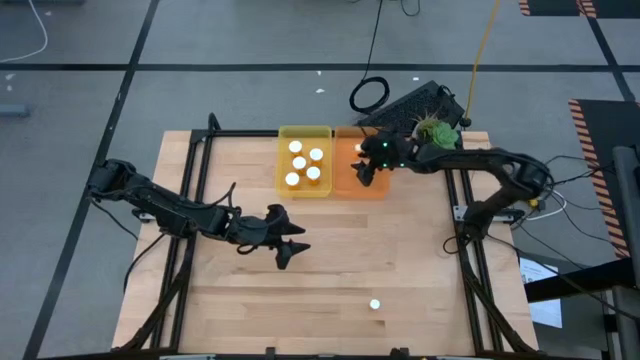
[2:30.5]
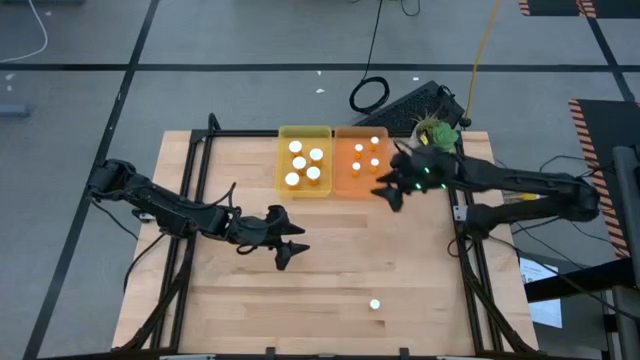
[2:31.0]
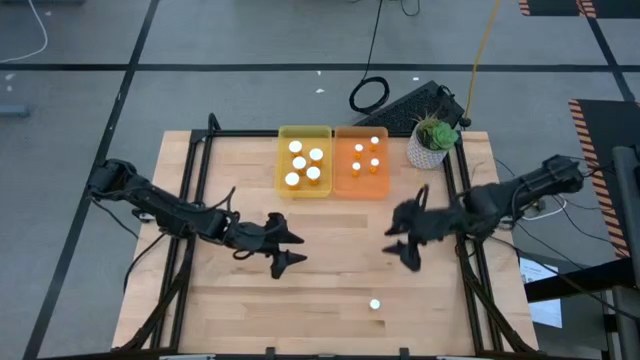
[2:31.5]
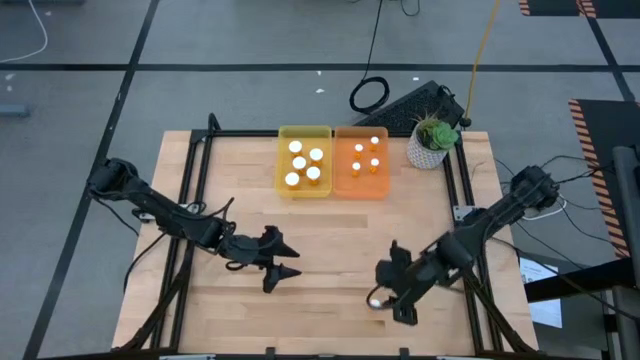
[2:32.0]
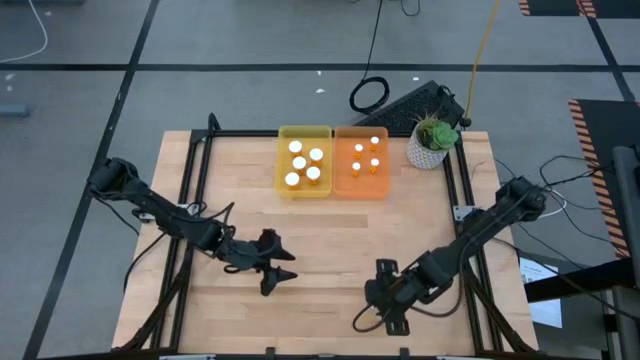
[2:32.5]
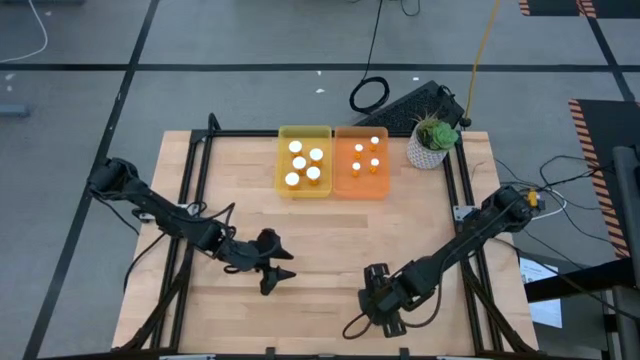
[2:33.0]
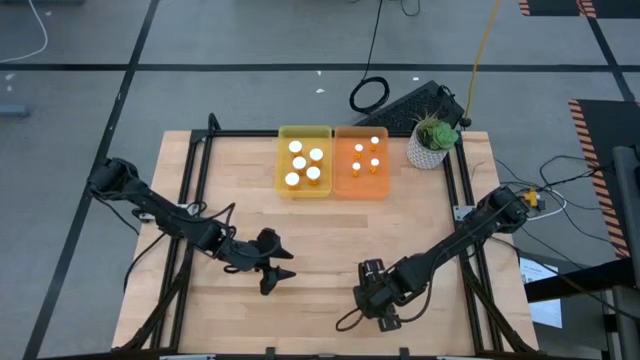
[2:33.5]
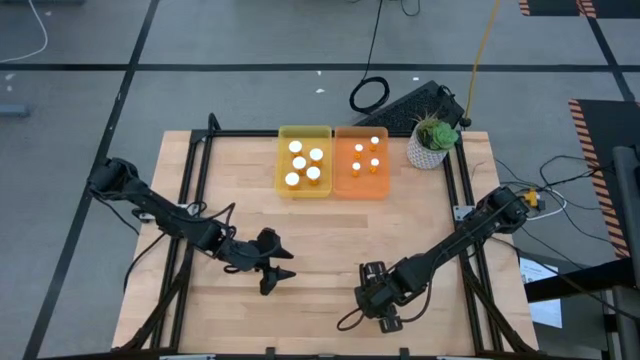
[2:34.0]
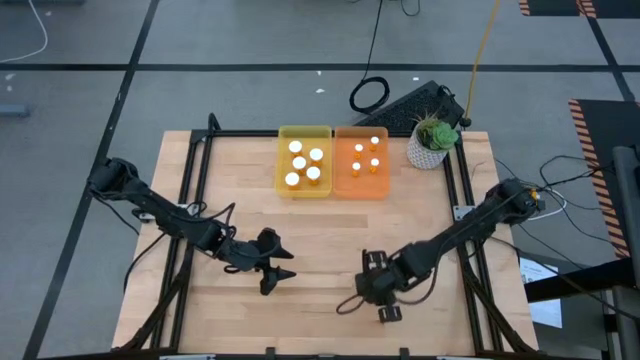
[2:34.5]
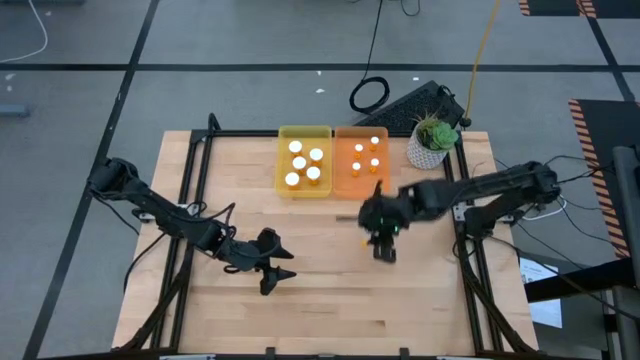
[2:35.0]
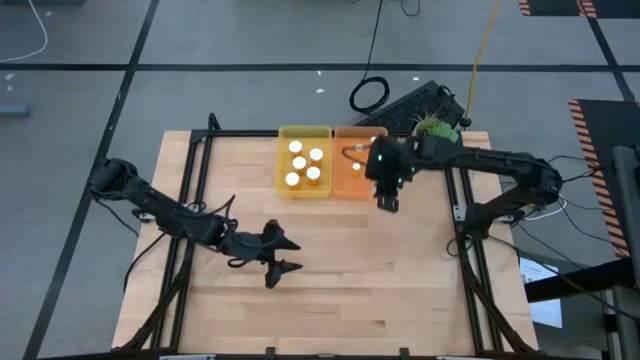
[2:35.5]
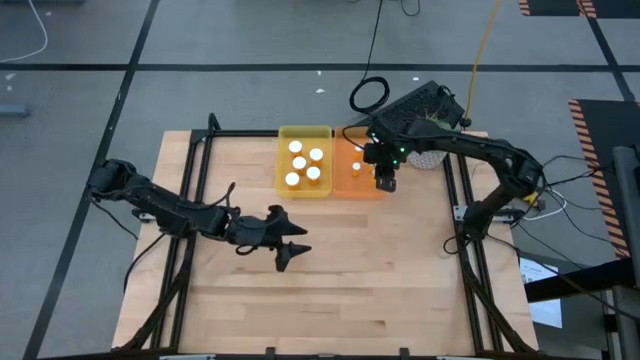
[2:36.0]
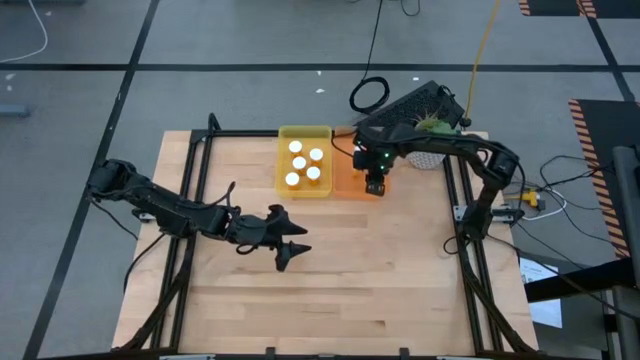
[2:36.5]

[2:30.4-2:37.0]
Task: Pick and place medicine bottles into bin by pill shape (circle, oval)
Put the small orange tablet bottle into the orange bin

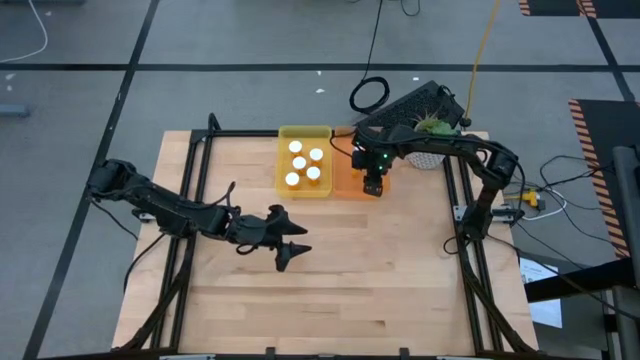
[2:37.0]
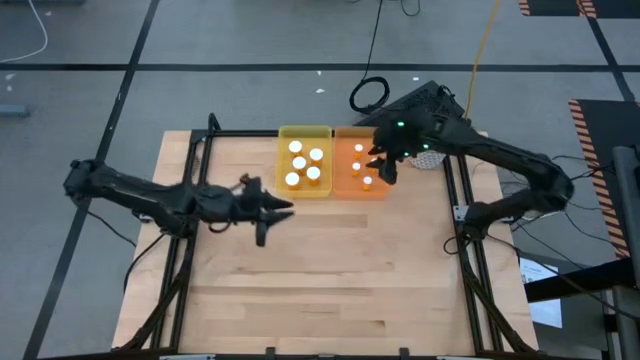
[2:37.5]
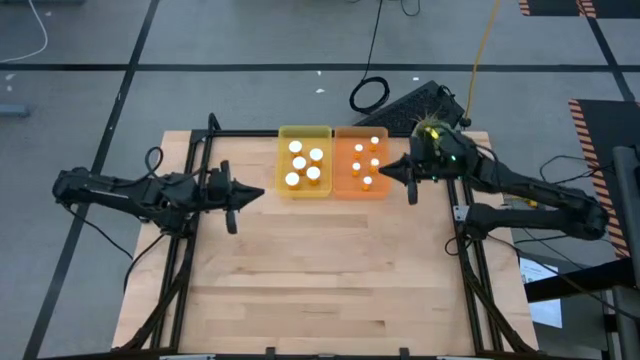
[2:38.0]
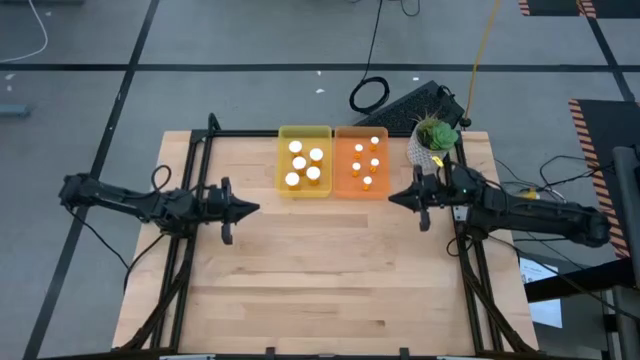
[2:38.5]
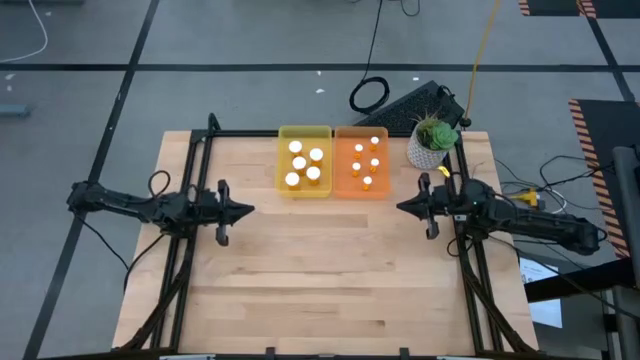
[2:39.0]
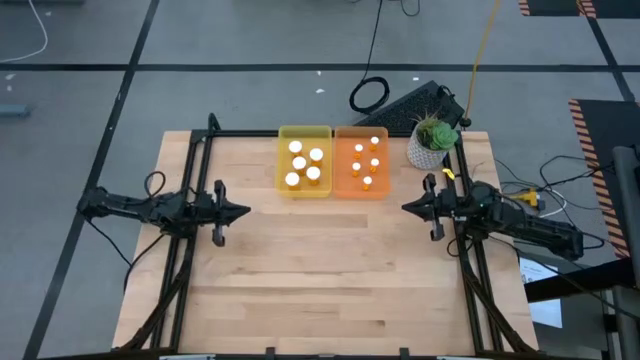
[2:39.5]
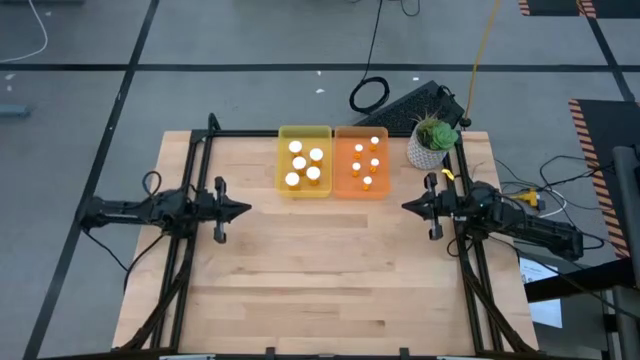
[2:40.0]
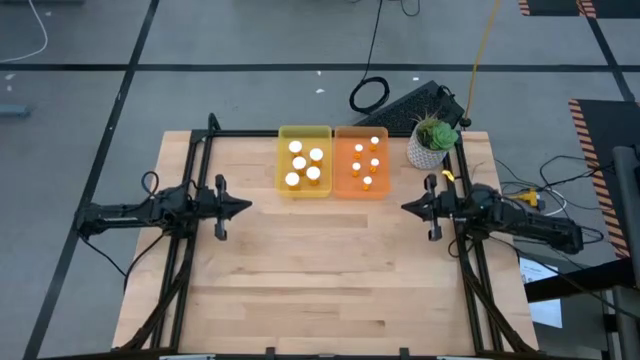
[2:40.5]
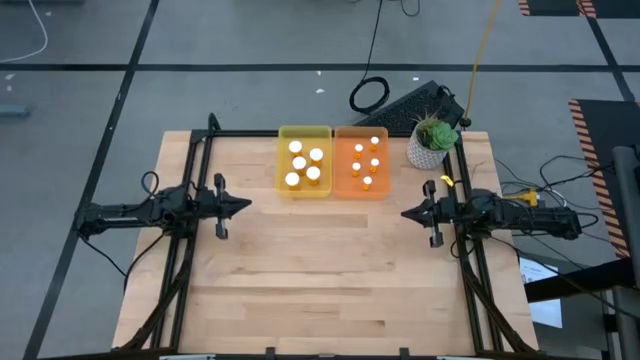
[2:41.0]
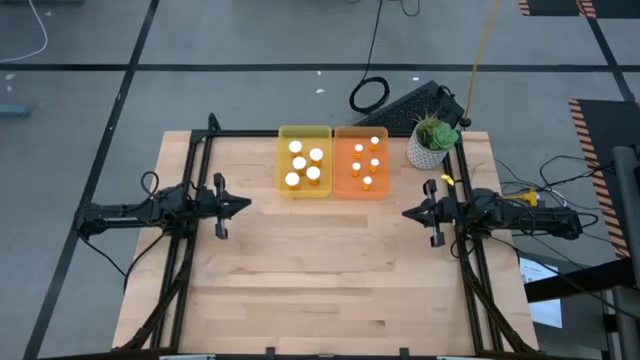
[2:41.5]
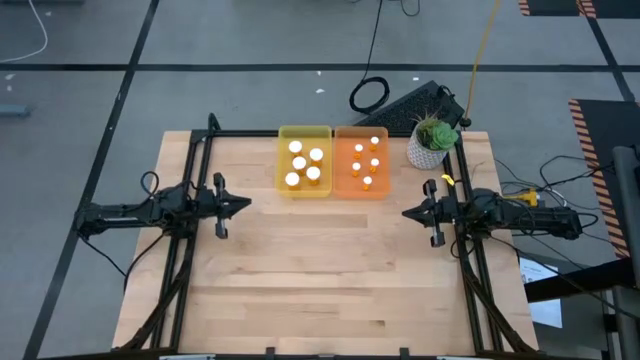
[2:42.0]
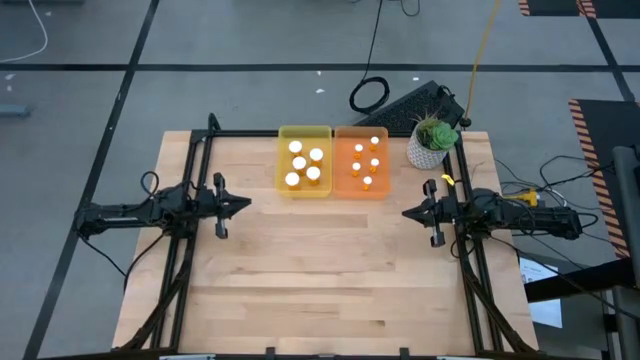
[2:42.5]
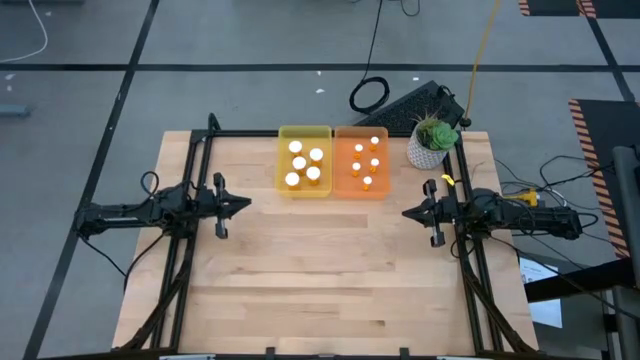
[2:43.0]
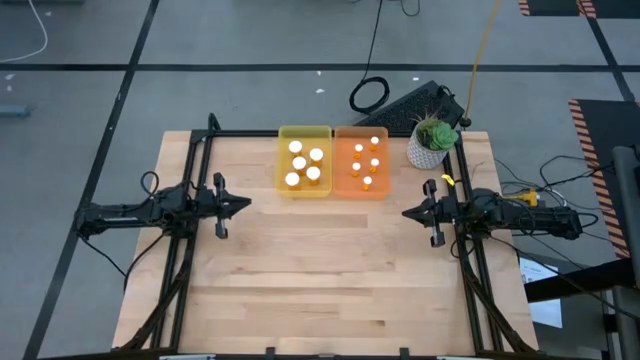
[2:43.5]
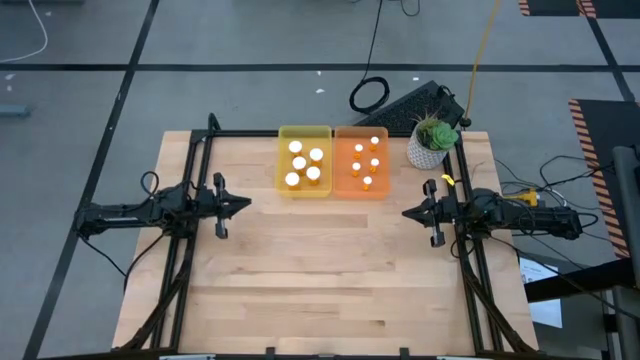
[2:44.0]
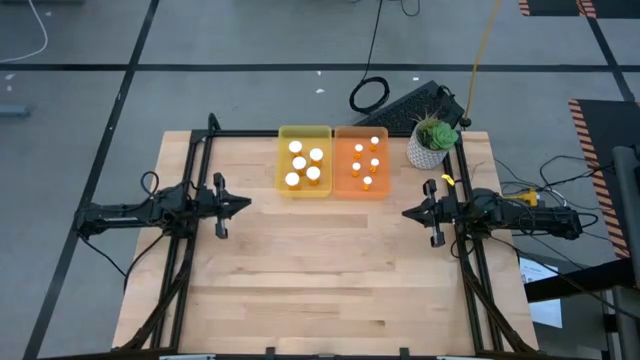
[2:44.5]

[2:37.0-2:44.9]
Return to Home Position

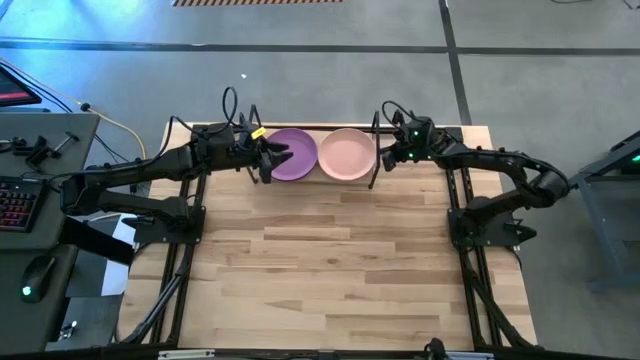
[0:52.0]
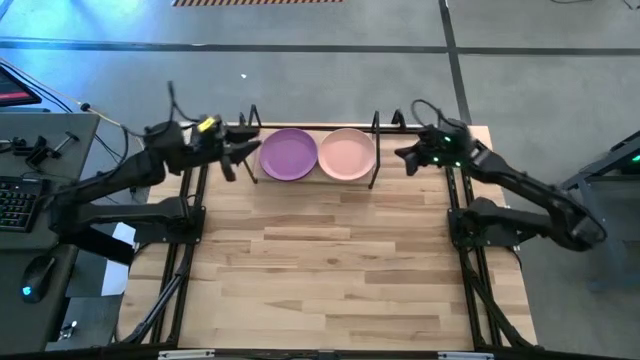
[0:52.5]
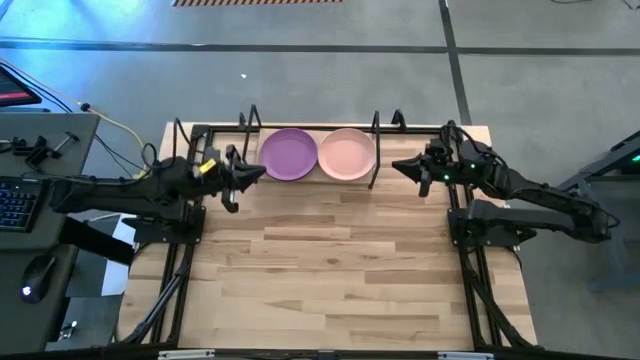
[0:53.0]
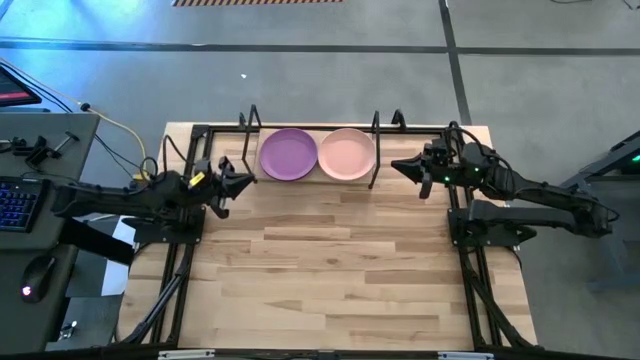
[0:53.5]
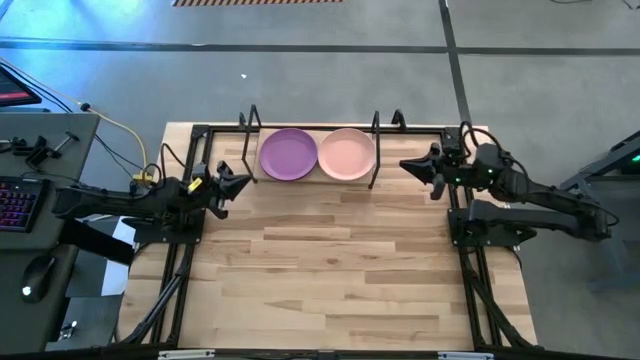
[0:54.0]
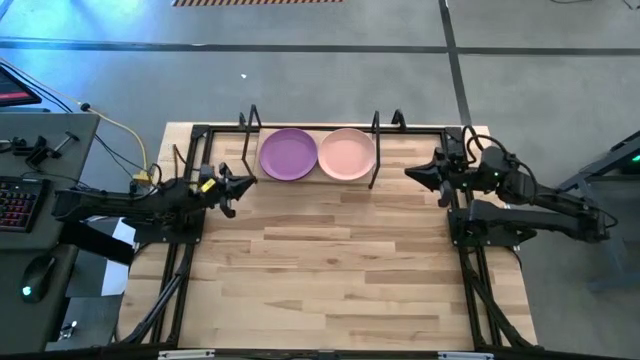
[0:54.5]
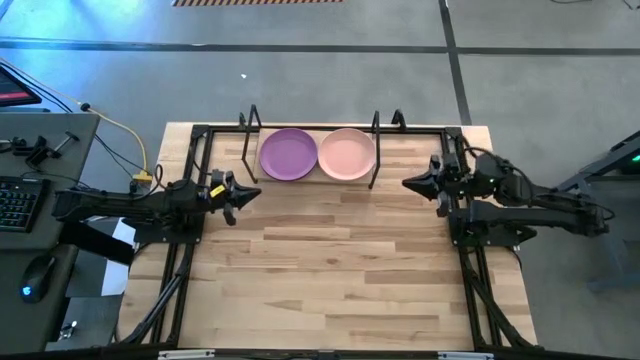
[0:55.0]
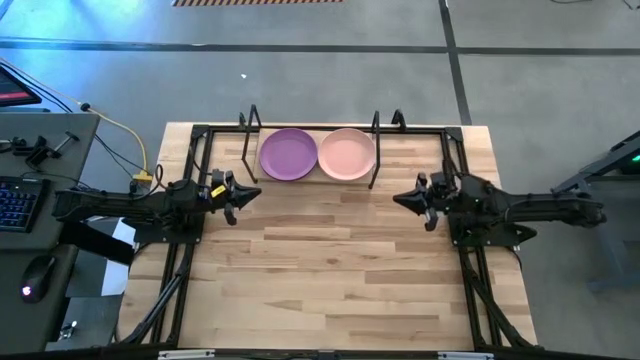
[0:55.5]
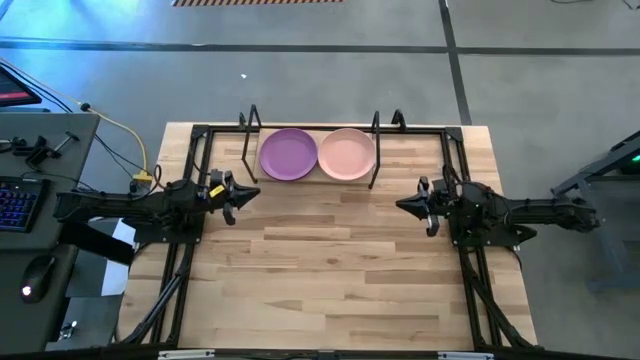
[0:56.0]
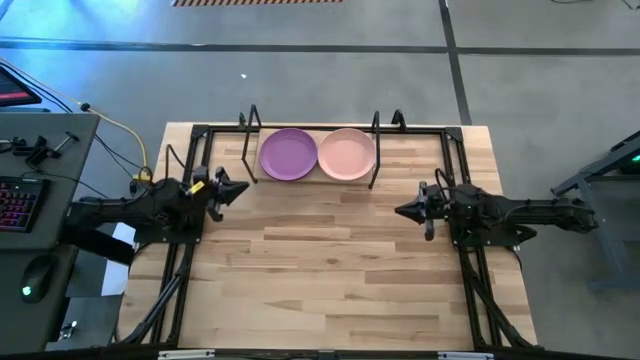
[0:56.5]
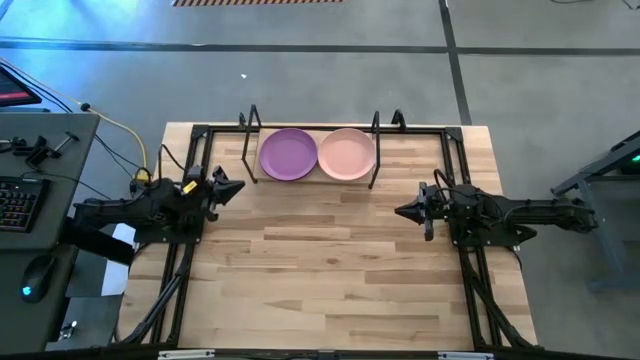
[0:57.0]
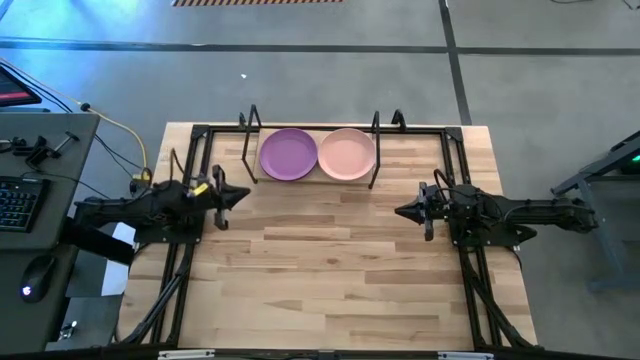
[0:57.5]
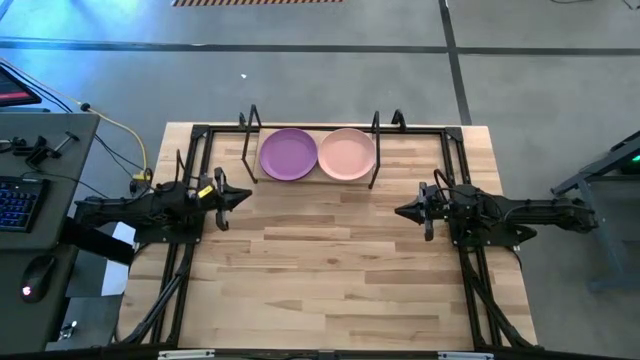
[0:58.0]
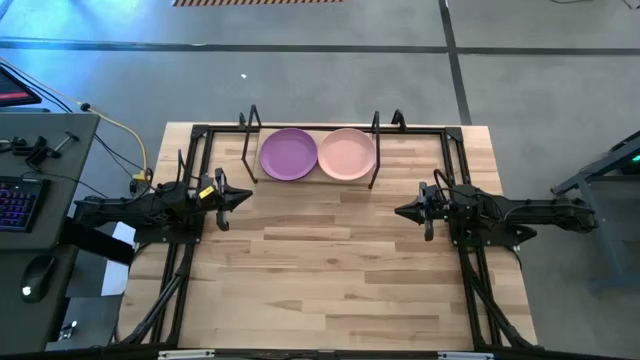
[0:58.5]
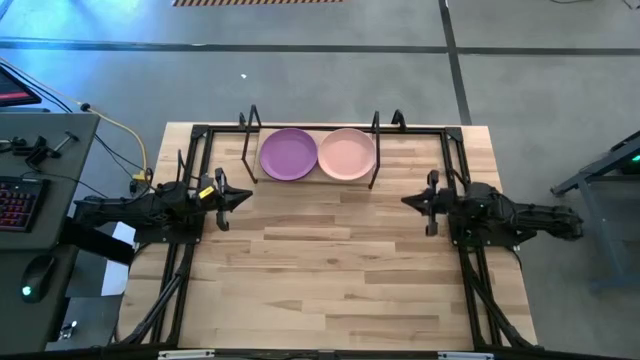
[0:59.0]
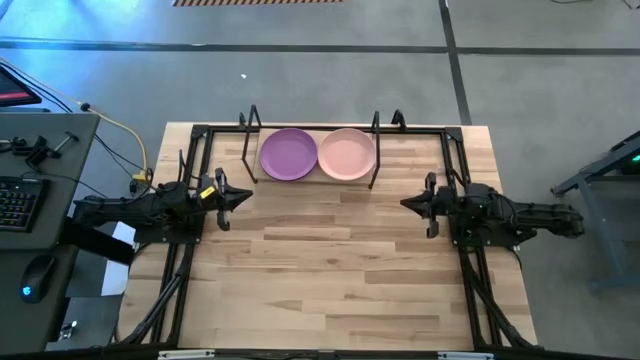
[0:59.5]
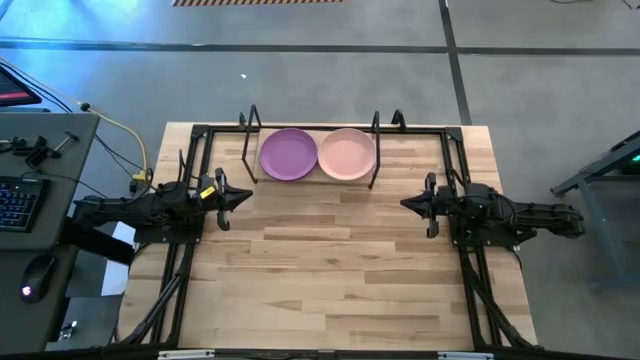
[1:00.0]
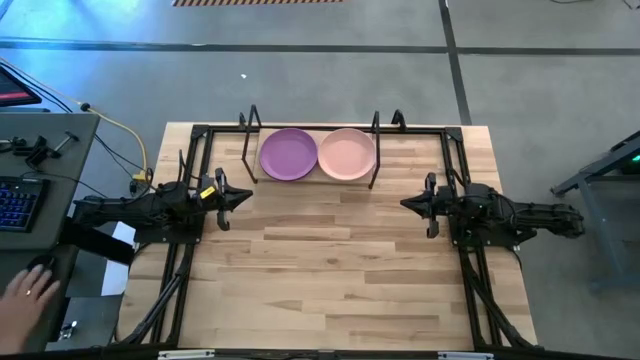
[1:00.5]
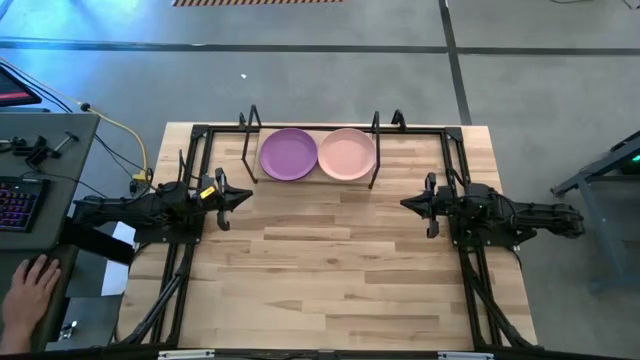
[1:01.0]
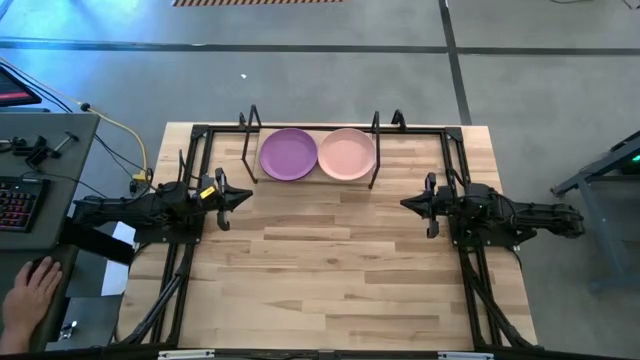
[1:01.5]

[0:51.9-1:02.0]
Task: Place and stack plates onto a shelf
Return to Home Position
